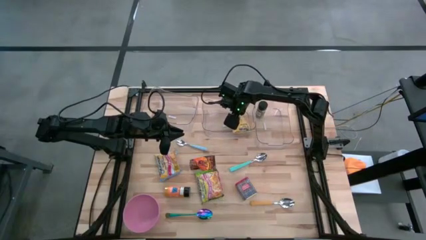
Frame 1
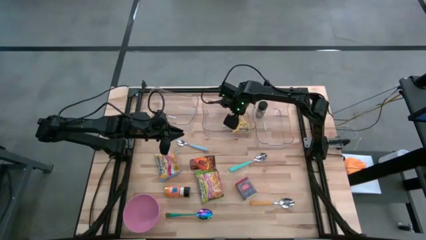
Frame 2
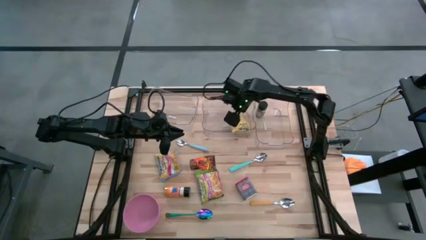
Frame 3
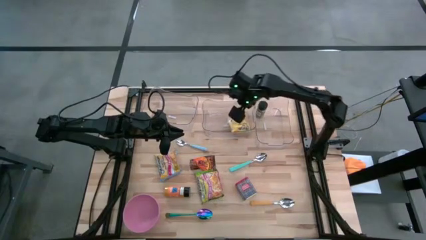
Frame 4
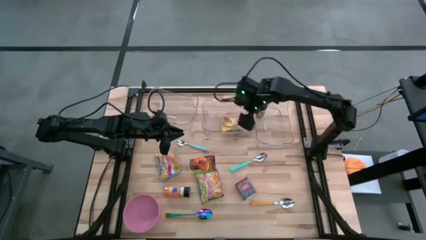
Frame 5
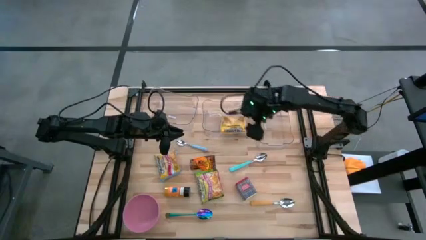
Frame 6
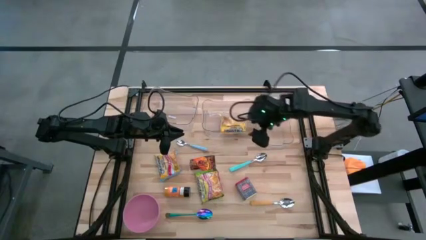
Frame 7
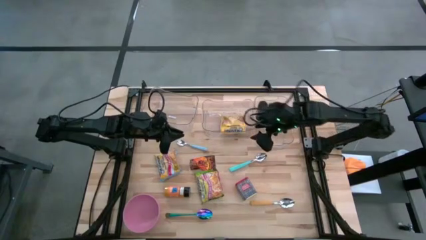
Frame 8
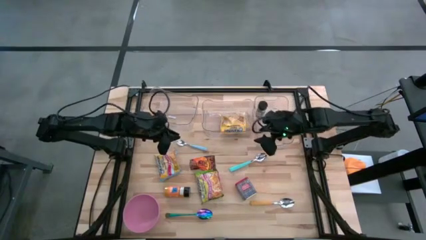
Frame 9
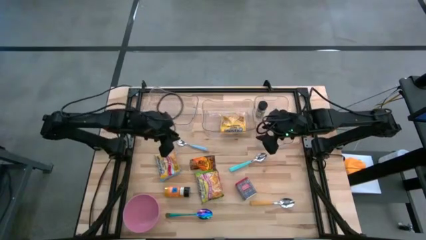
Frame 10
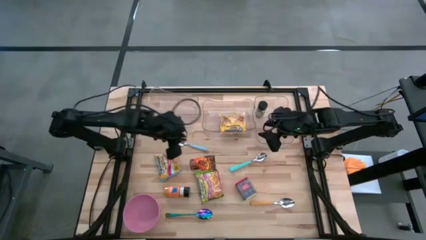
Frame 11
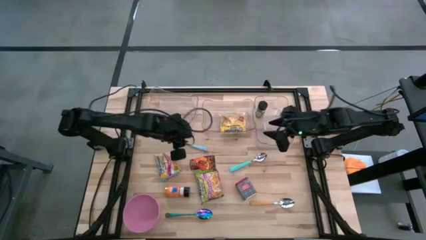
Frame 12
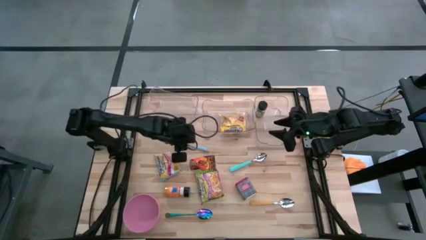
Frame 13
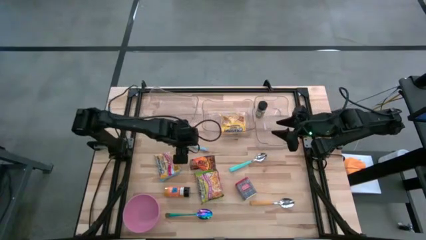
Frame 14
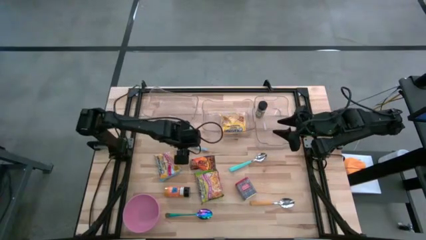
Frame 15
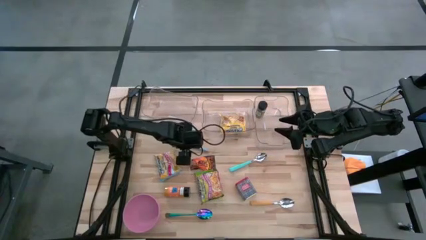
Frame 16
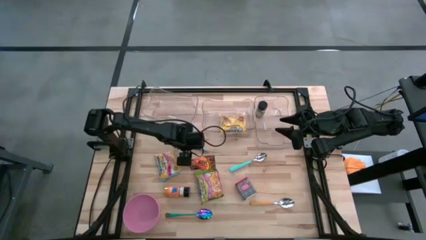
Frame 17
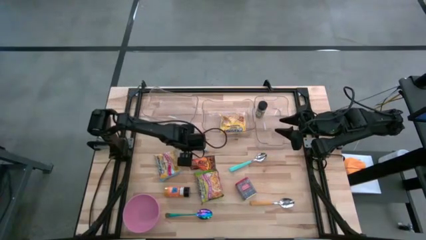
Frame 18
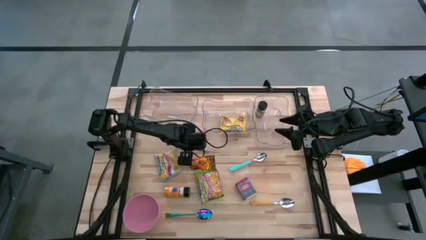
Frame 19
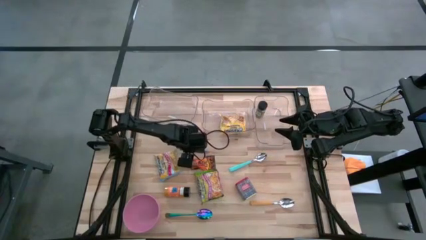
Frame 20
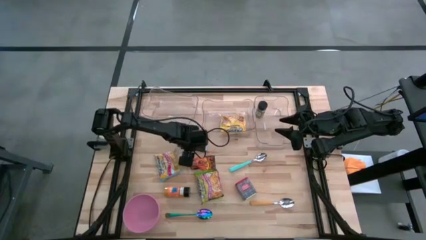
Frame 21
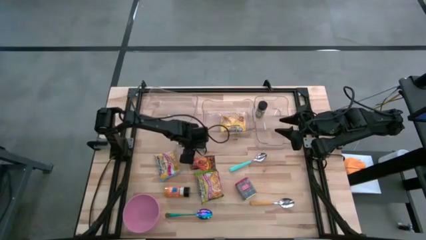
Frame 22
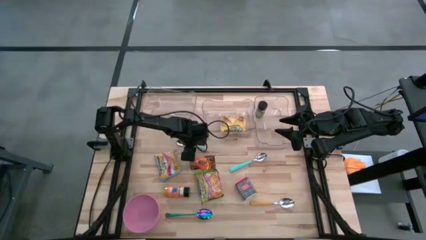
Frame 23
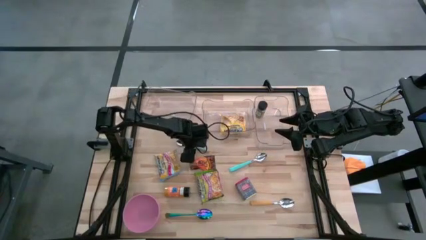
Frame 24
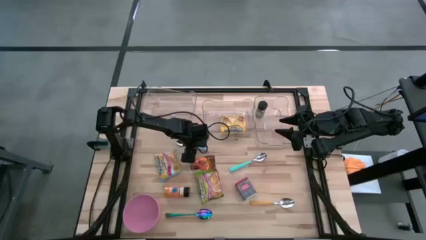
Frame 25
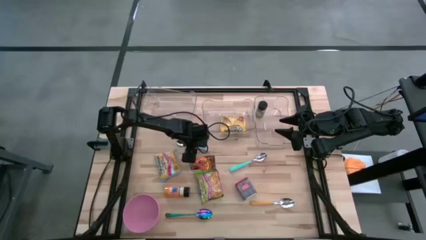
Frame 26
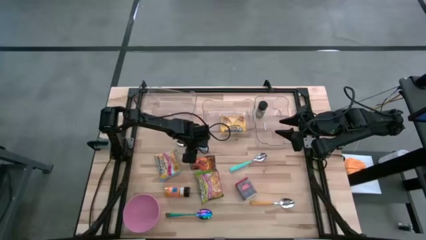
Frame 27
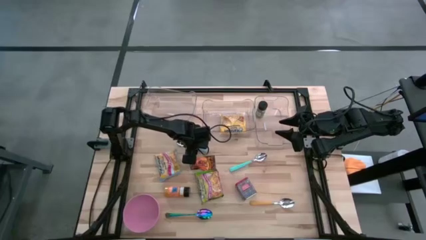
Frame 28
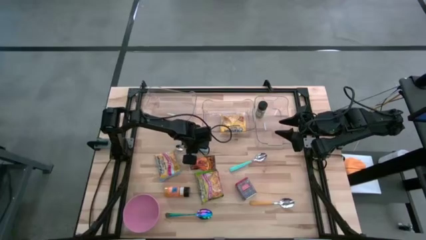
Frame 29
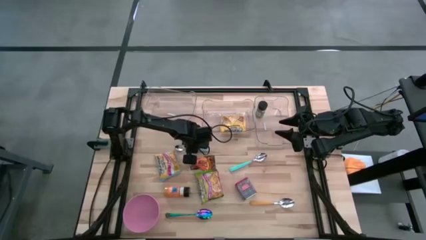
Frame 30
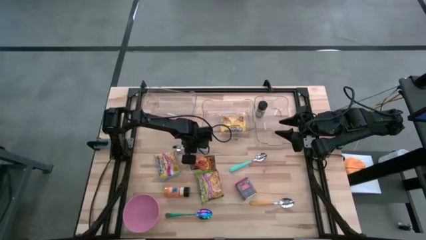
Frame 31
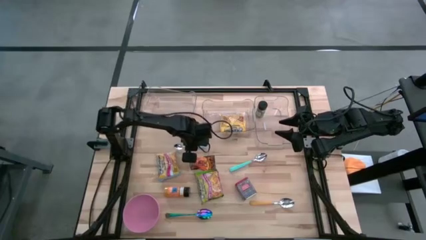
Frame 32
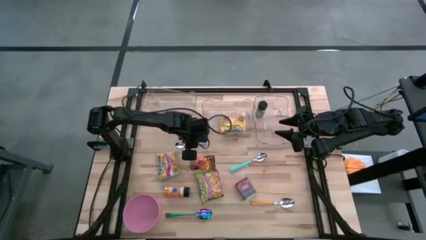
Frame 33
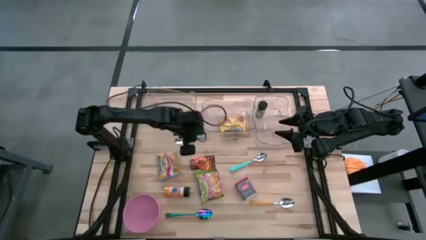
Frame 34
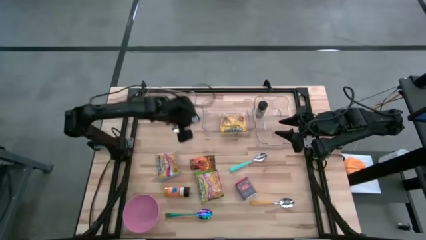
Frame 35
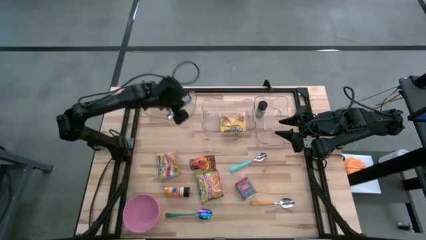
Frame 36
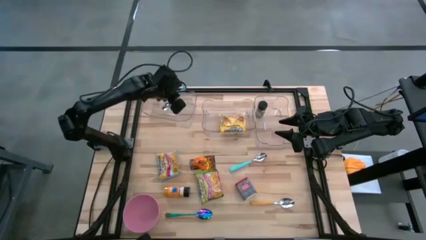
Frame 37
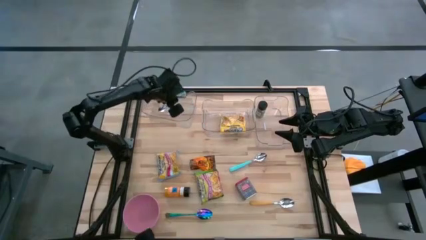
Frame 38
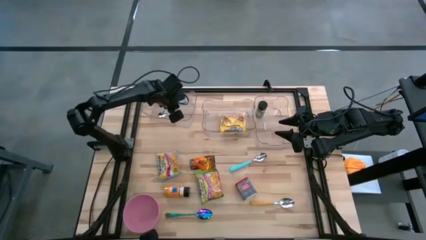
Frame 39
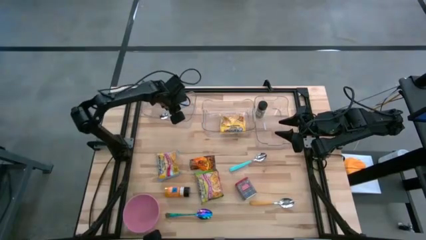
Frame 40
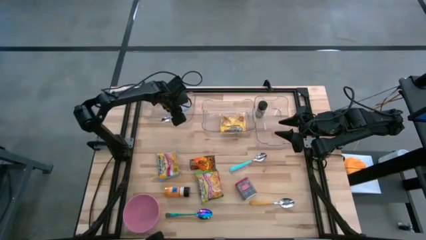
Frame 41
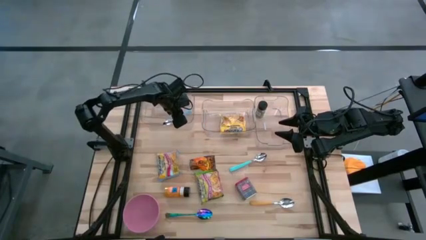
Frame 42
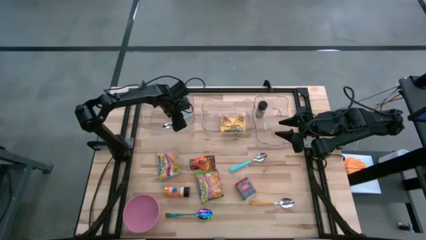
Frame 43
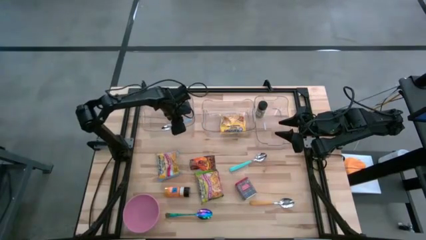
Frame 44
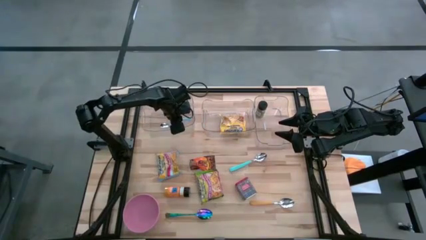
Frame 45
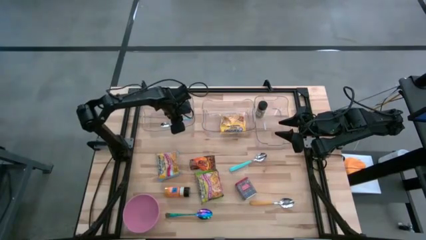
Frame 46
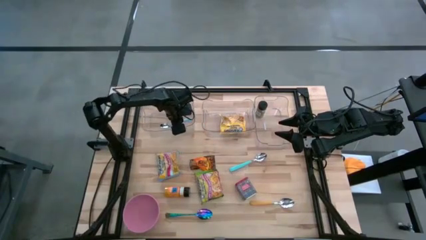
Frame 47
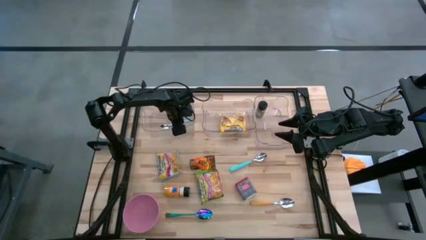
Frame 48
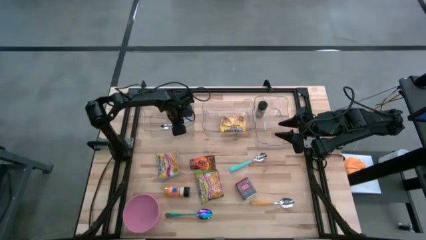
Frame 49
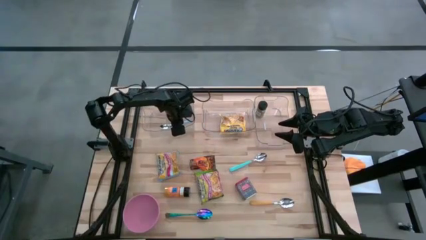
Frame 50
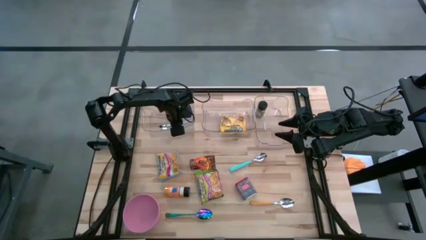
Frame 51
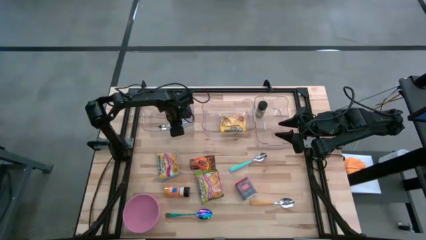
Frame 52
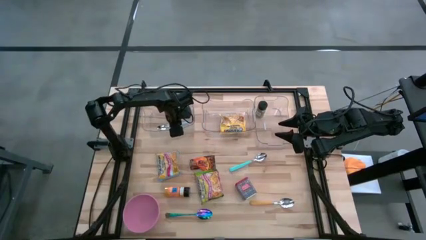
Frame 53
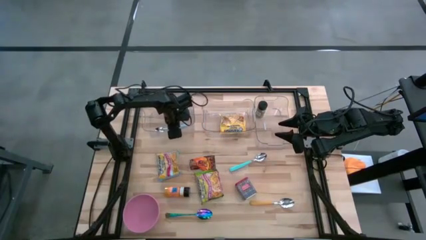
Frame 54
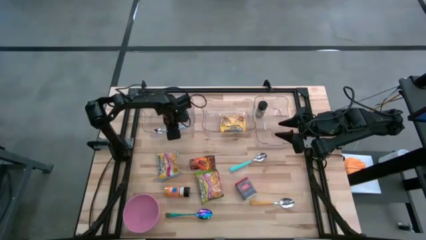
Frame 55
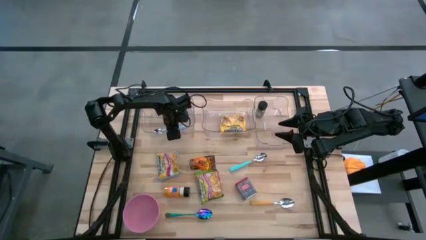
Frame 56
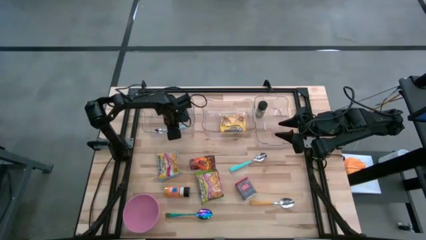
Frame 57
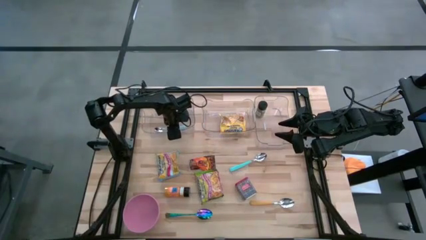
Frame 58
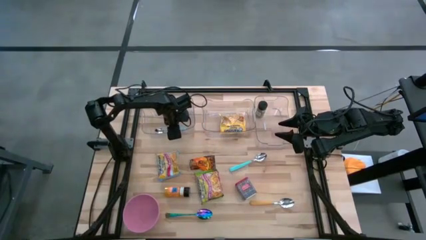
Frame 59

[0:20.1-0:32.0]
Put the left blue spoon into the left transparent bin

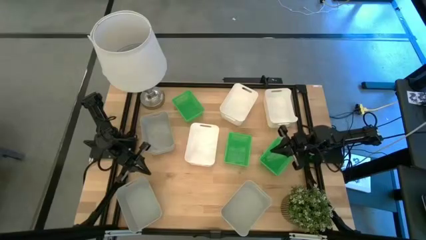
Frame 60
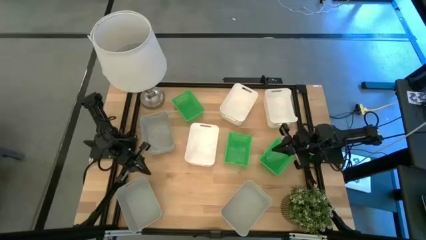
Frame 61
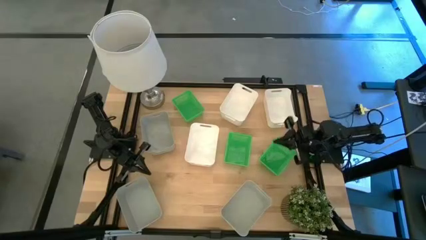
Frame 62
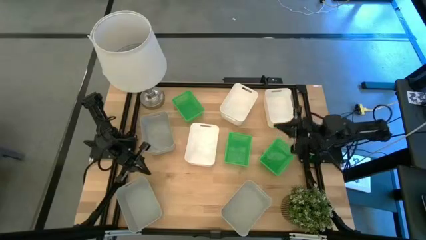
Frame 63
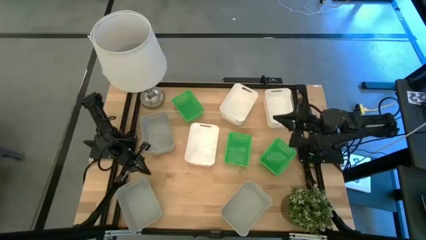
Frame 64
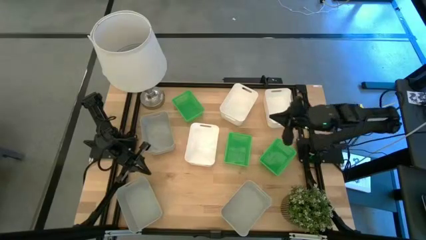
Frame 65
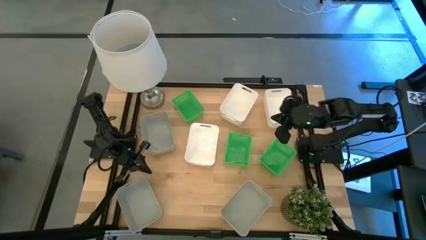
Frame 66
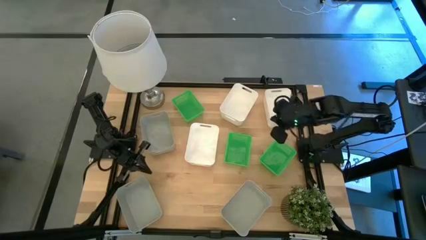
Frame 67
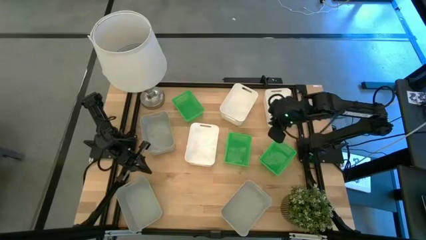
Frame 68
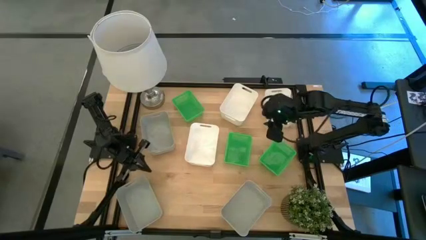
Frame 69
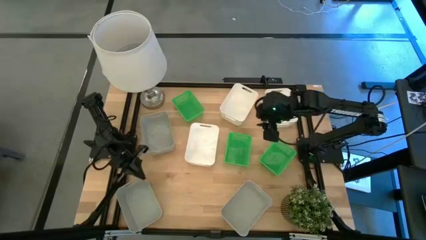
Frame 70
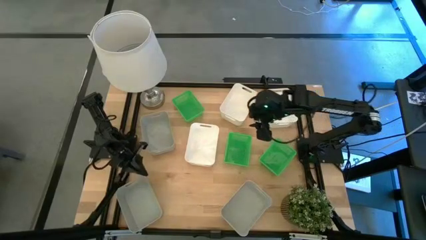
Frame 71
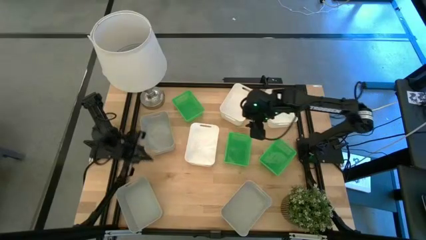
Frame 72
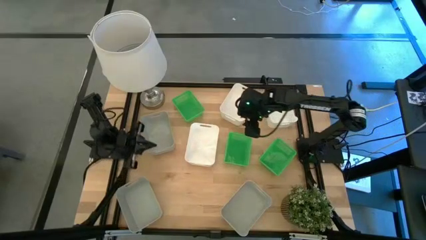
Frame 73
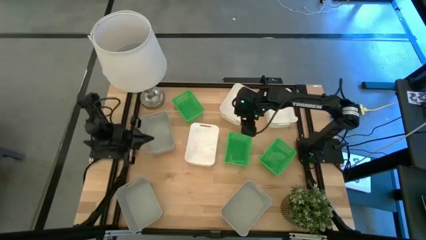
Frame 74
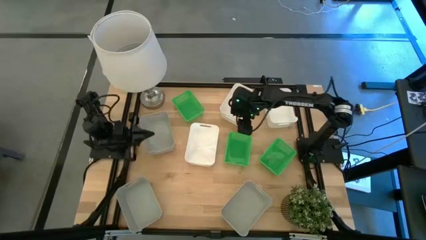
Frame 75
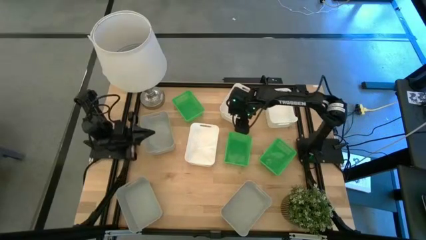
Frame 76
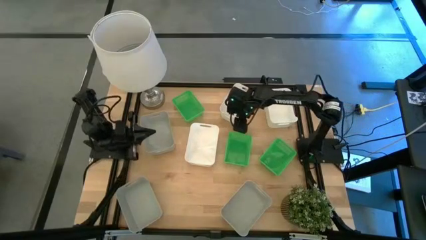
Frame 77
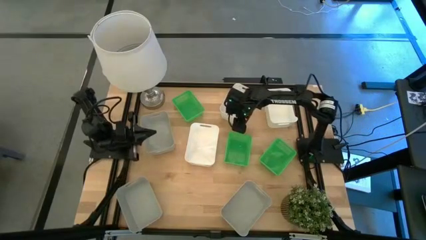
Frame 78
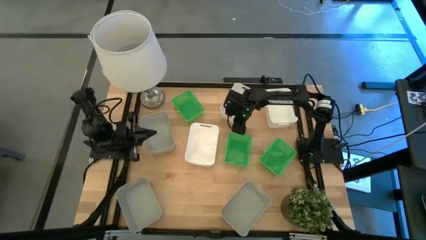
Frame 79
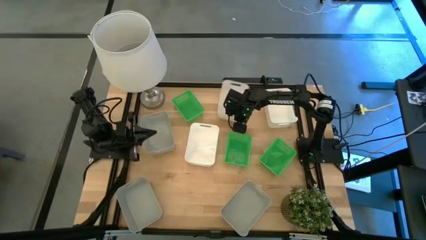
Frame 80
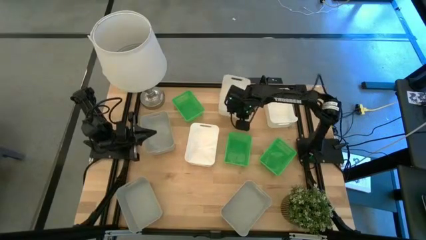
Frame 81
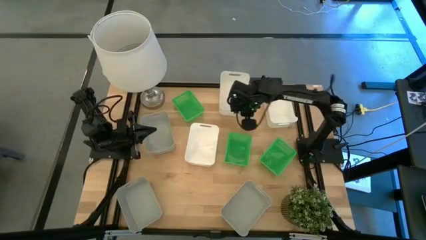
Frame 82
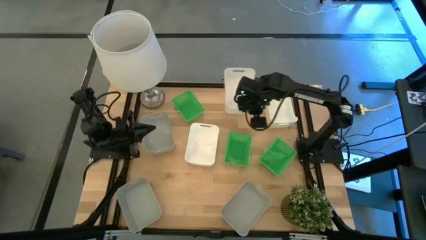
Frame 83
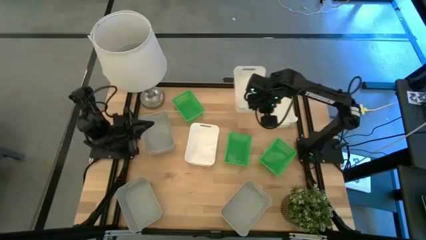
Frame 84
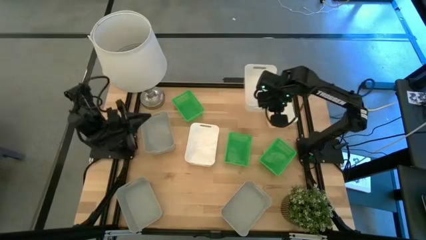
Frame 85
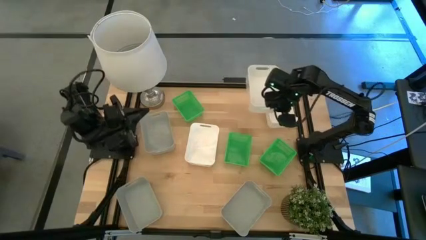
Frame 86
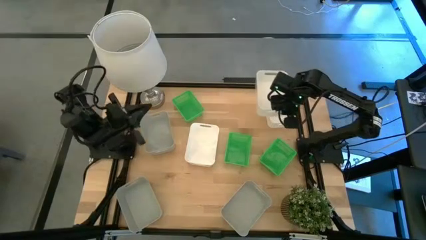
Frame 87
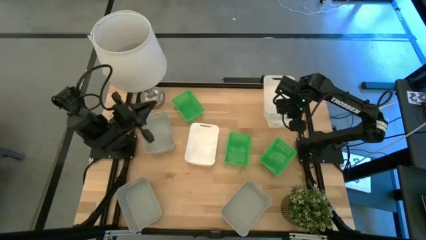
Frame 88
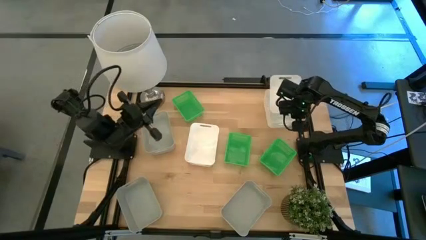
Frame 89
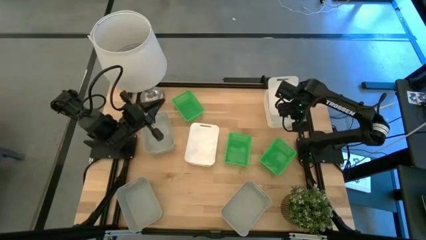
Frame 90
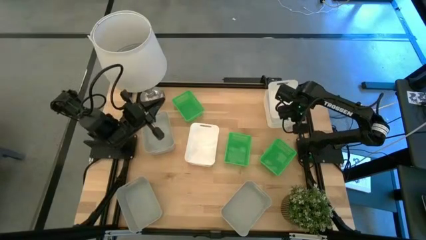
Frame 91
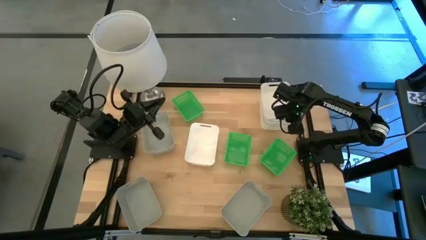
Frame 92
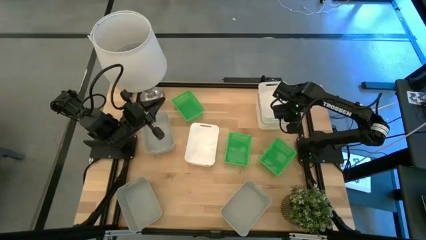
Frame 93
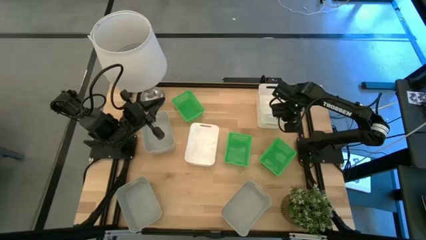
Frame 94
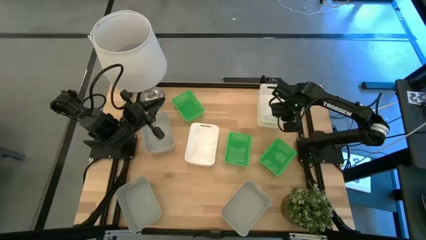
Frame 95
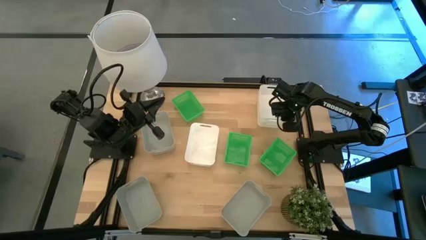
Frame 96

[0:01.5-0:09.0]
Stack the top left white bin on top of the right white bin
